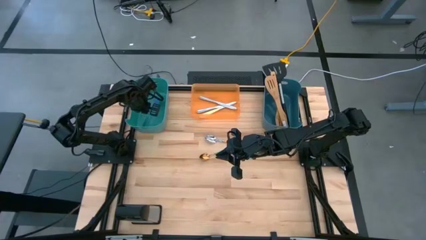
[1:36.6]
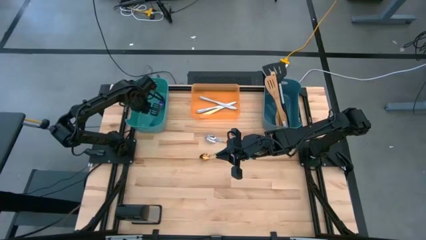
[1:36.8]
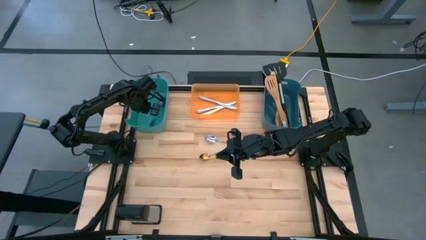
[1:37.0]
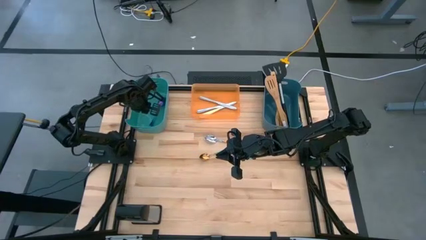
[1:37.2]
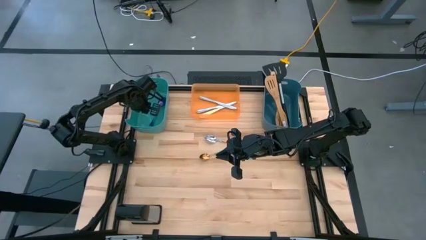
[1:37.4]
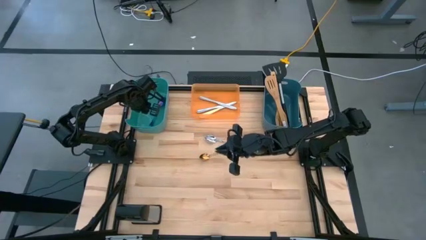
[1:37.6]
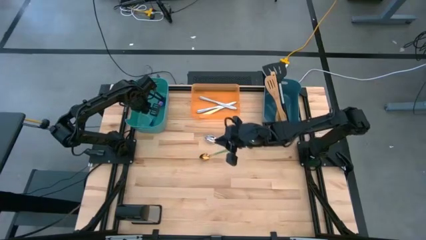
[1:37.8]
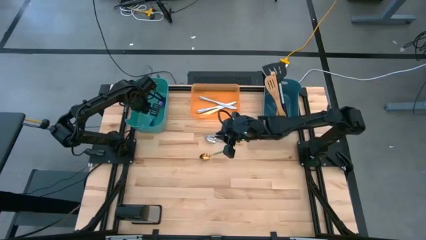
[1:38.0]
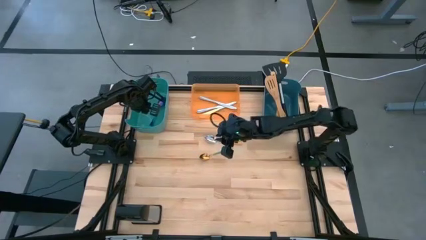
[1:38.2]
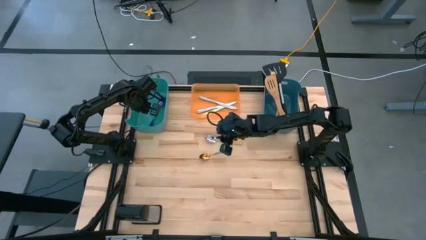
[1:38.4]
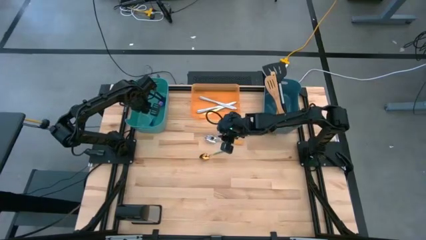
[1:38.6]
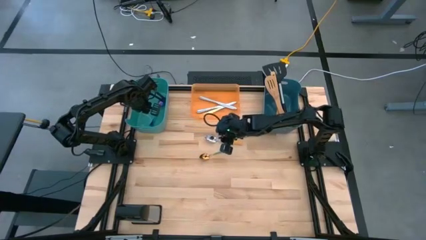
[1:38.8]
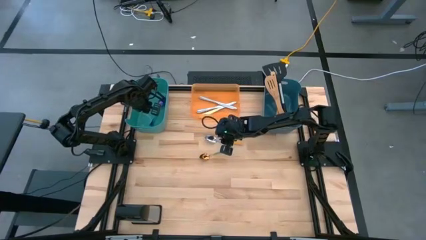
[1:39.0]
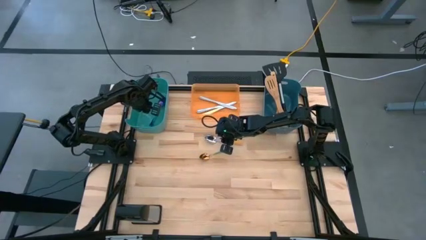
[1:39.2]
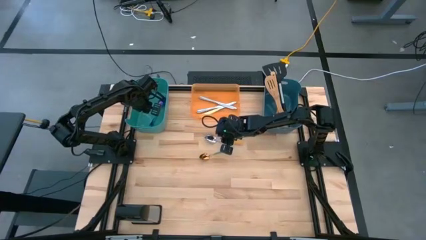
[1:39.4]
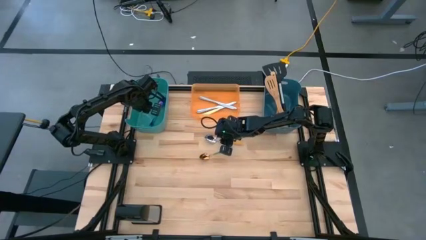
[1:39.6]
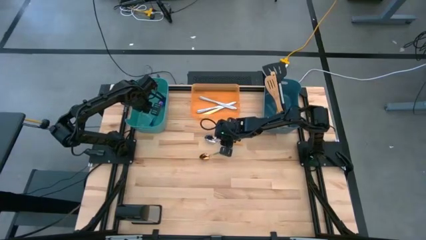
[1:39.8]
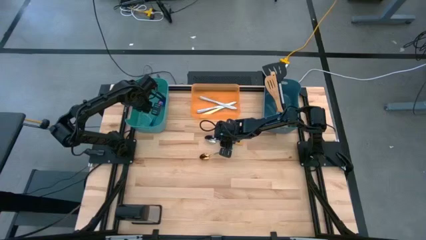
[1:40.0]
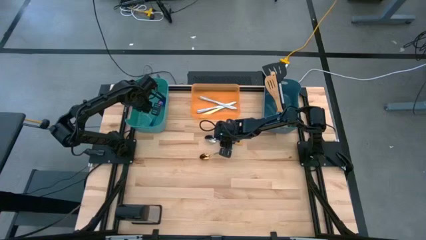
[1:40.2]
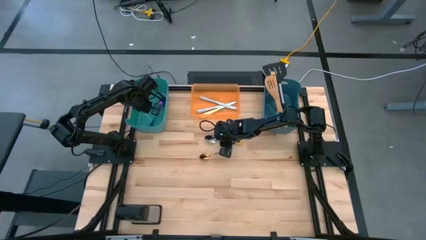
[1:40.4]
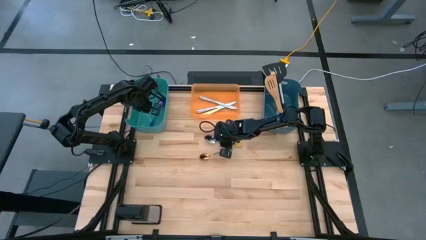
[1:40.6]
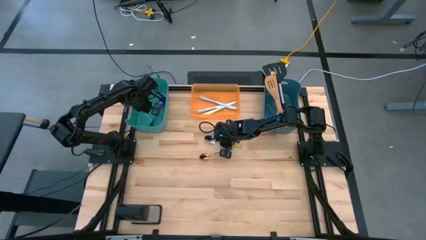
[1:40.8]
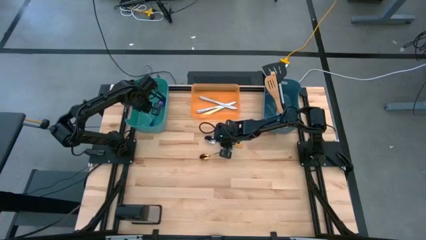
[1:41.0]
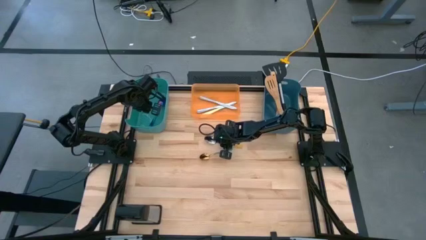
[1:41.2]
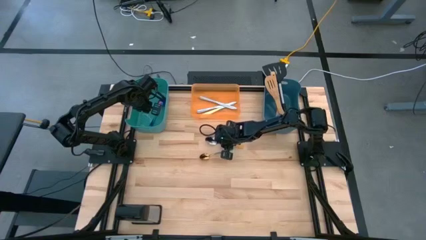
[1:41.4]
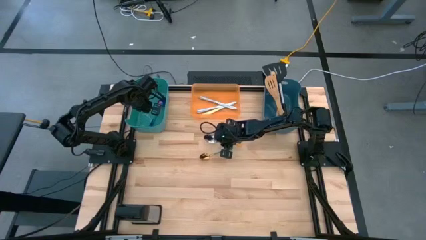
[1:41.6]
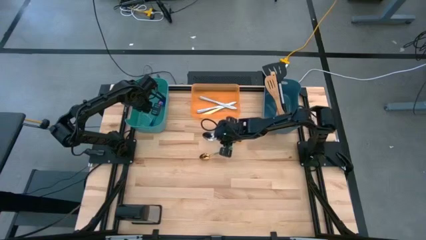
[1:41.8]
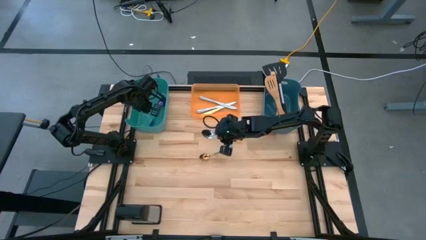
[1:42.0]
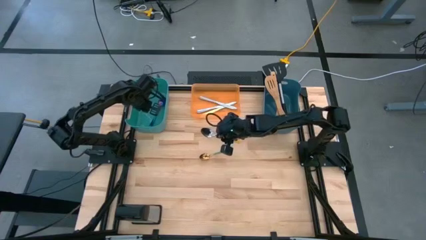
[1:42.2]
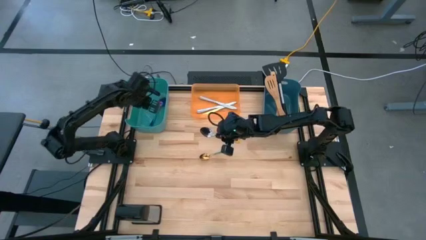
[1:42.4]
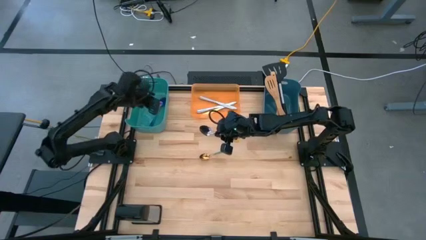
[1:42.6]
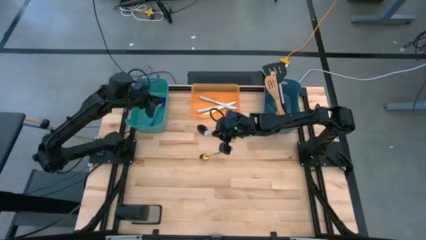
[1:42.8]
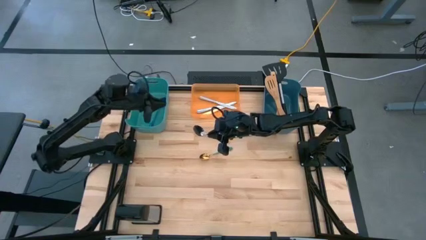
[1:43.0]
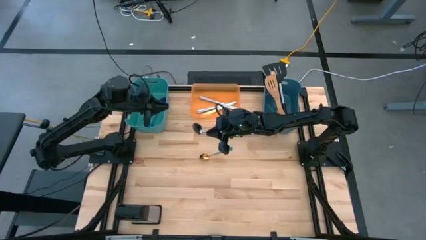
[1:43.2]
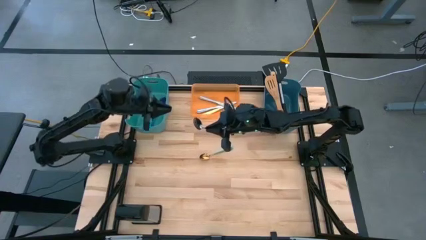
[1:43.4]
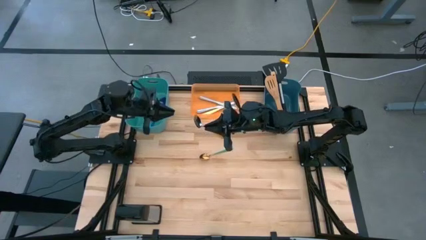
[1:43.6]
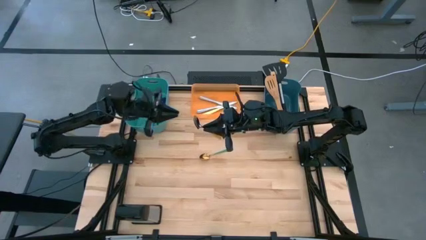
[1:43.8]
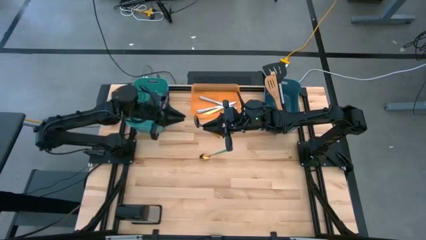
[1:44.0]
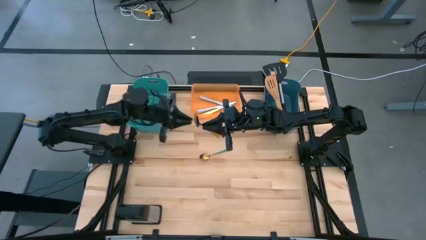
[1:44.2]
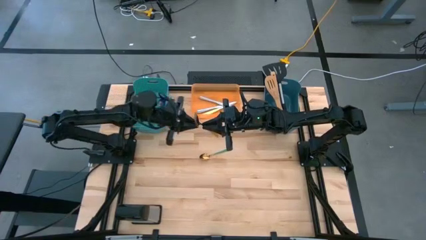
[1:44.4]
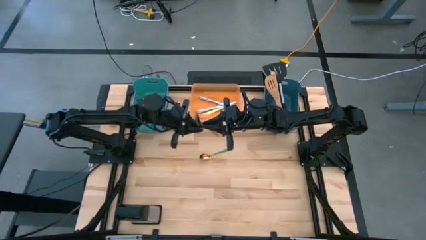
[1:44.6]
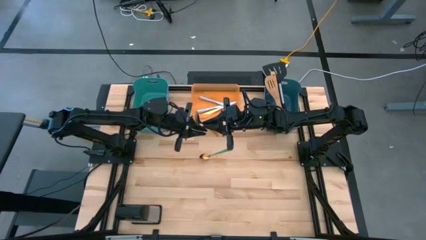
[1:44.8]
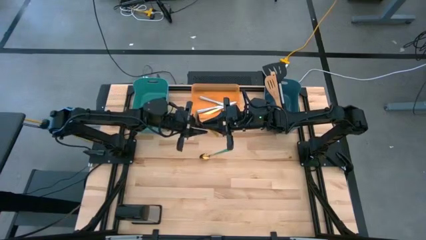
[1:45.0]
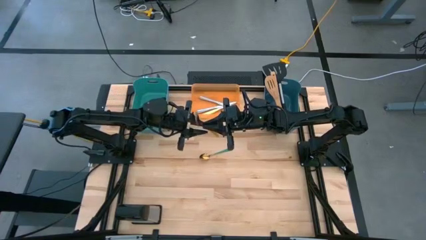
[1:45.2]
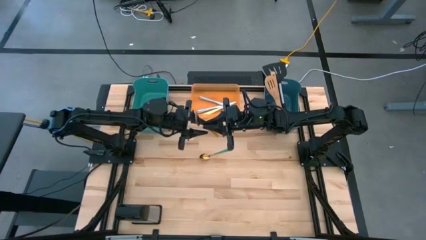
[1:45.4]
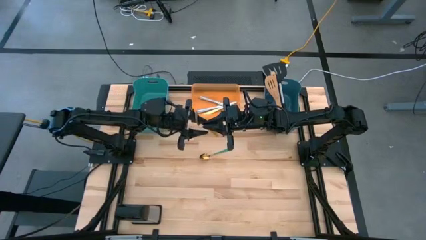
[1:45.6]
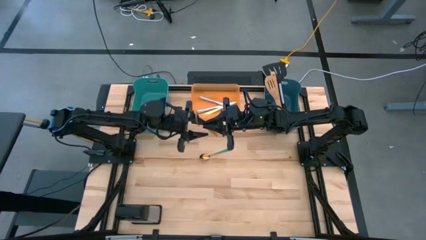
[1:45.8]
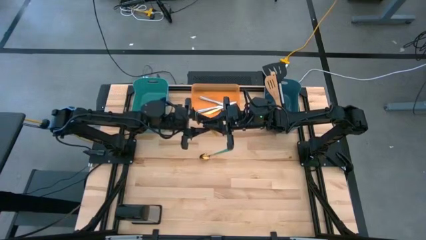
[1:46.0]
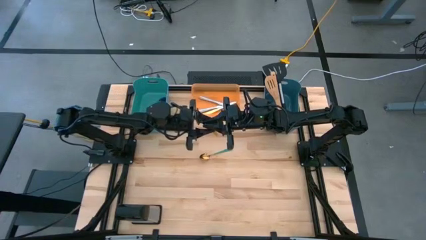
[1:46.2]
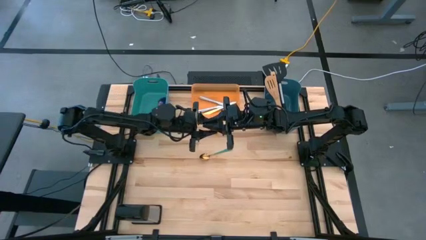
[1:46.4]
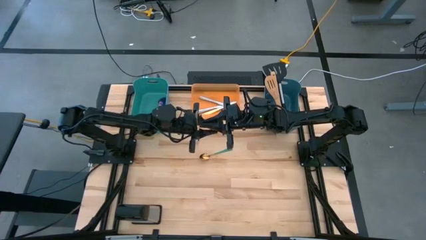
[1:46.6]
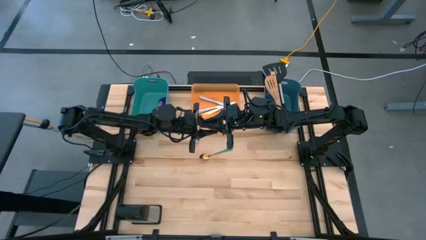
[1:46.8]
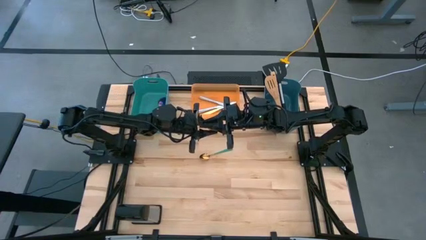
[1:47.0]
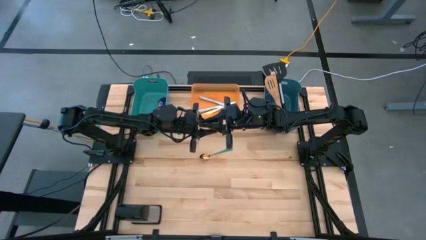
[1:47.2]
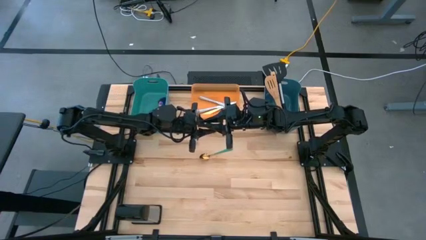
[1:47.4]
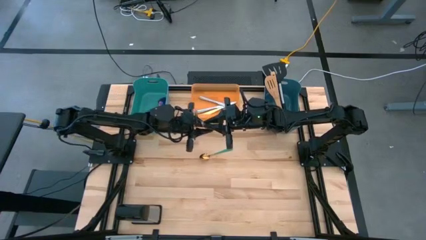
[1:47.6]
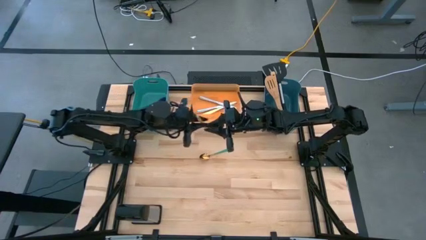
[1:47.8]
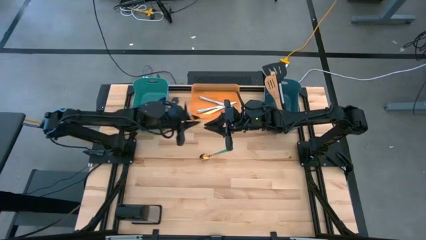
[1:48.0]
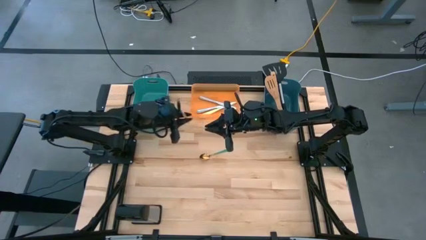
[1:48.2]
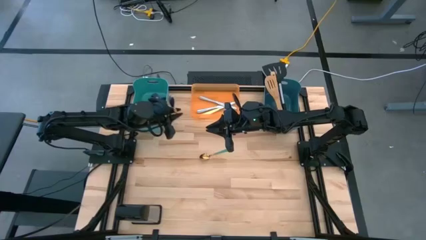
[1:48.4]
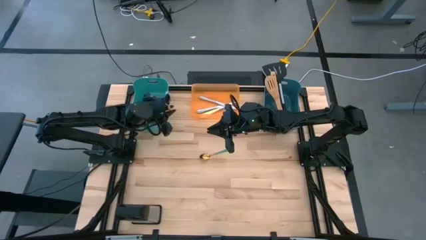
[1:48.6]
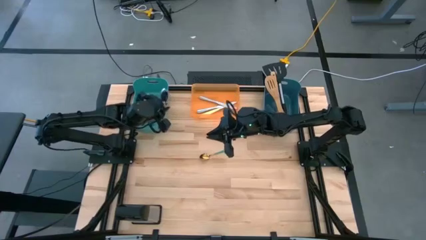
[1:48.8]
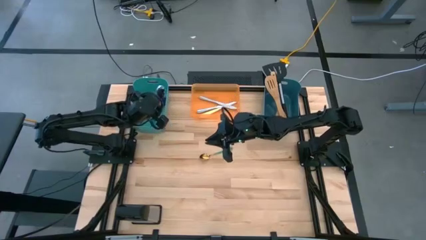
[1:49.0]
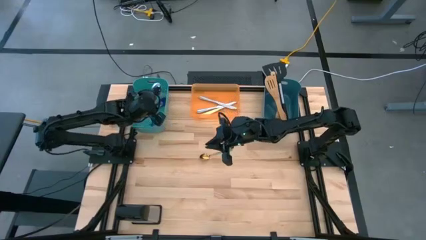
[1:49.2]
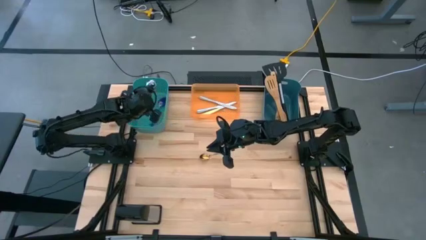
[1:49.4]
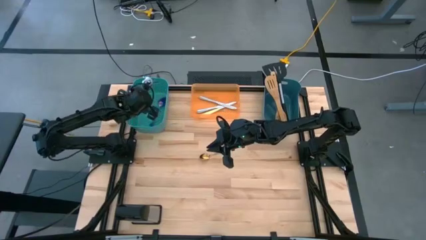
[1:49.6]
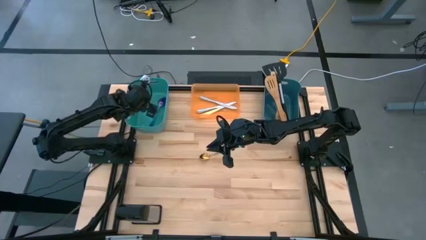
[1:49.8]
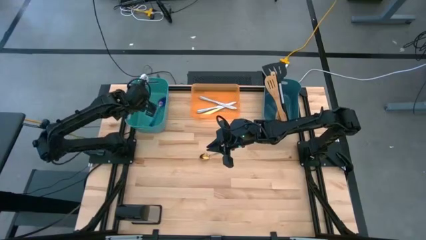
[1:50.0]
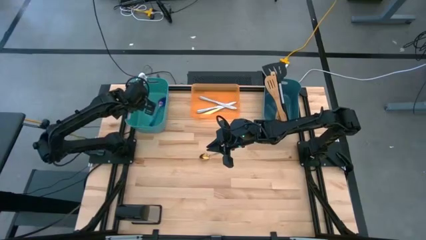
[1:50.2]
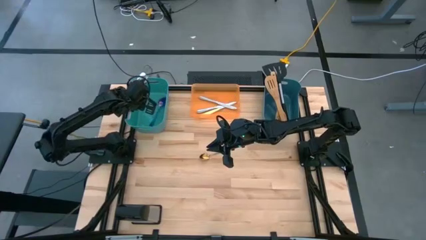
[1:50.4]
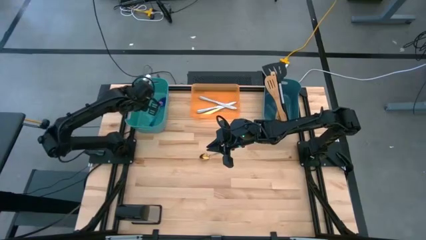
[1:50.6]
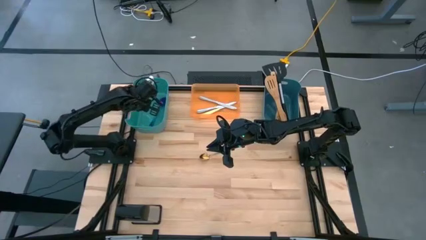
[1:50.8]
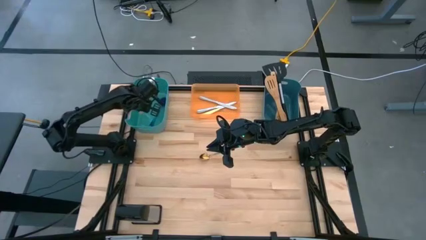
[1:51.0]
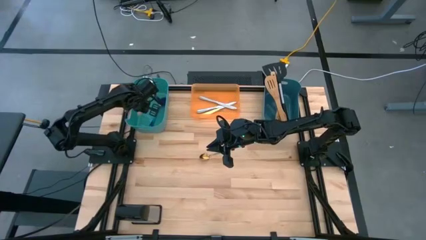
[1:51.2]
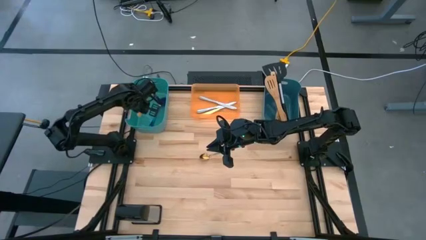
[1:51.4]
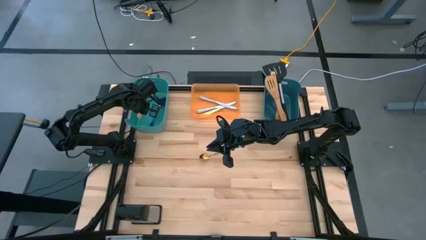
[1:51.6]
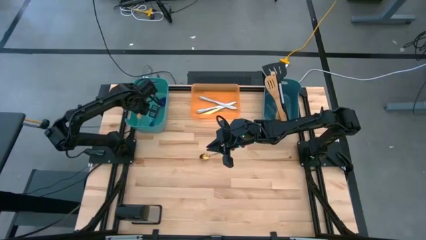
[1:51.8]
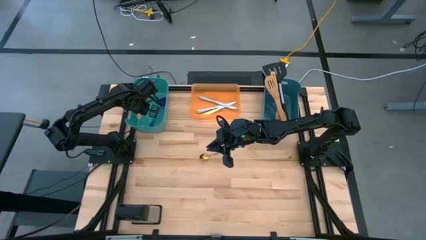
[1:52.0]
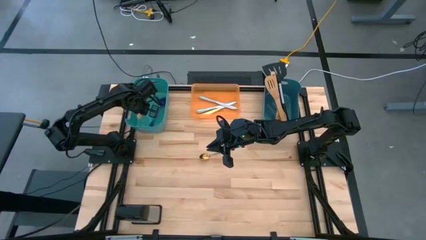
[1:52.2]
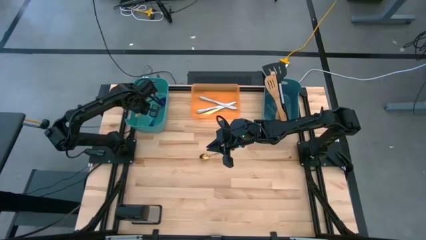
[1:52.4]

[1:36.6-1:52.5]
Task: Pick & Place Kitchen Items
Put the orange spoon into the green bin
